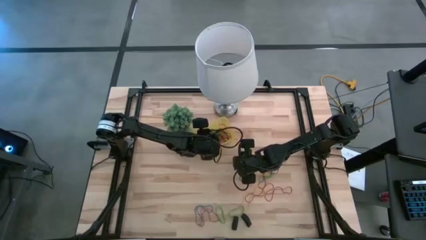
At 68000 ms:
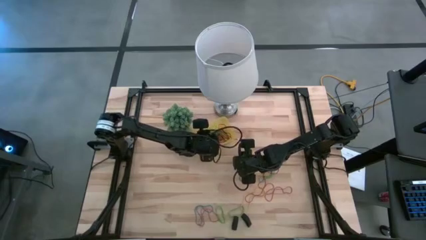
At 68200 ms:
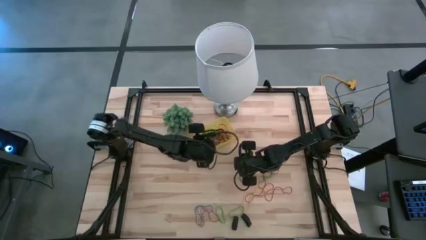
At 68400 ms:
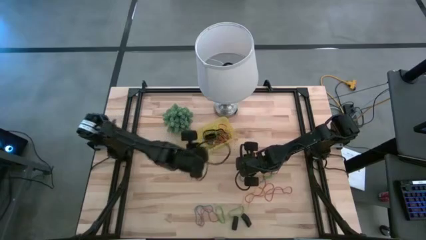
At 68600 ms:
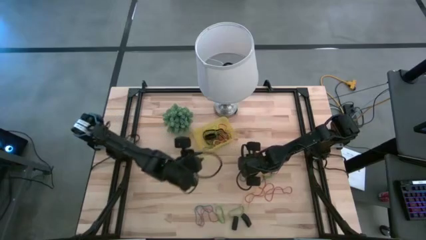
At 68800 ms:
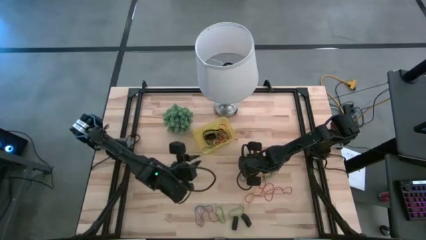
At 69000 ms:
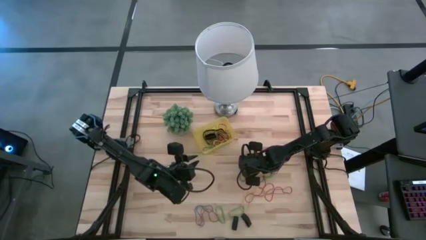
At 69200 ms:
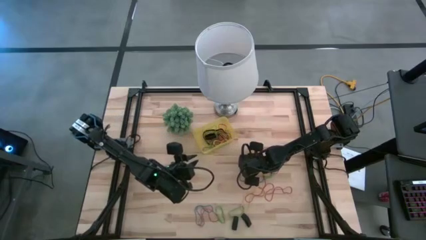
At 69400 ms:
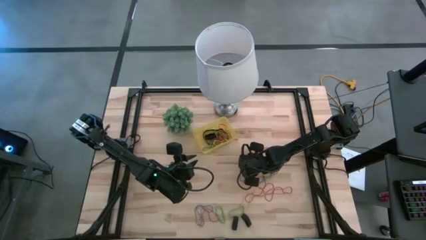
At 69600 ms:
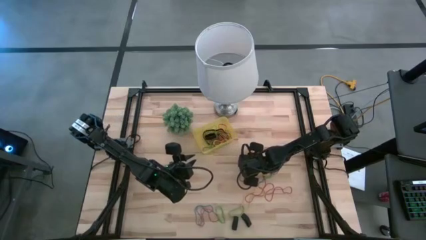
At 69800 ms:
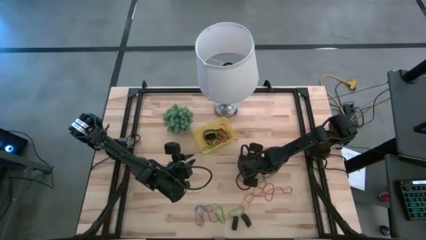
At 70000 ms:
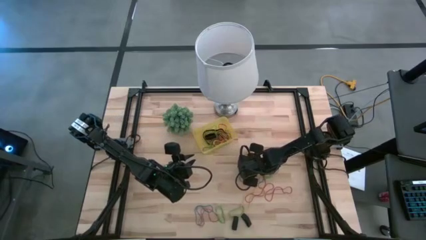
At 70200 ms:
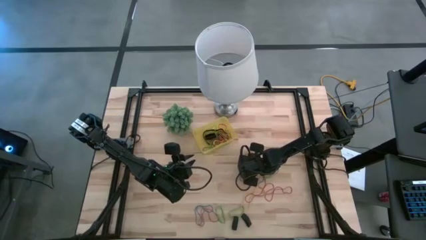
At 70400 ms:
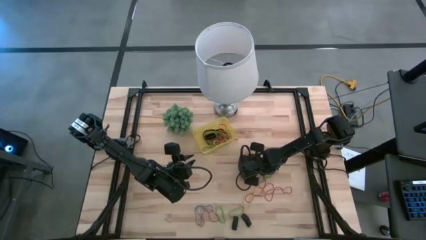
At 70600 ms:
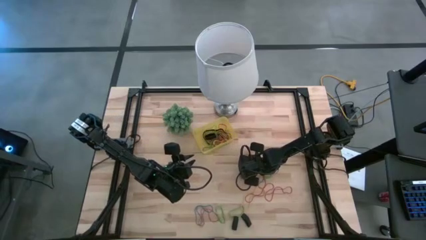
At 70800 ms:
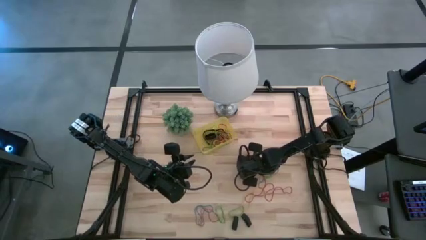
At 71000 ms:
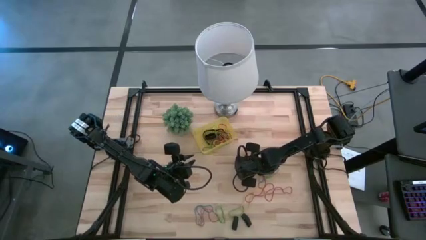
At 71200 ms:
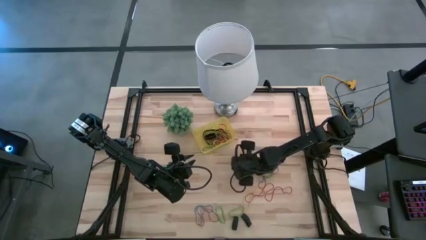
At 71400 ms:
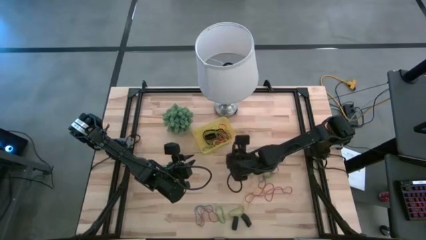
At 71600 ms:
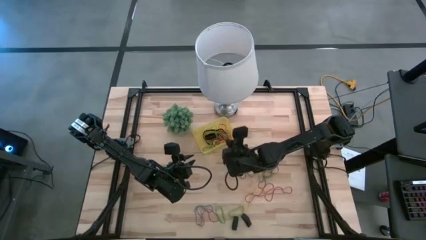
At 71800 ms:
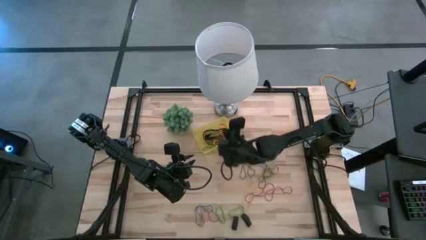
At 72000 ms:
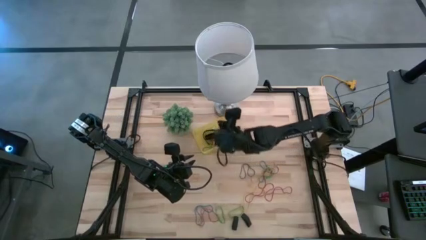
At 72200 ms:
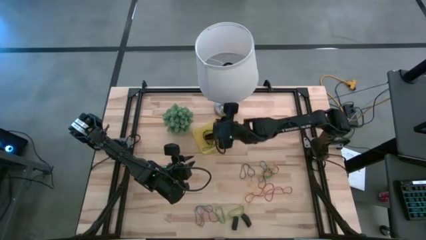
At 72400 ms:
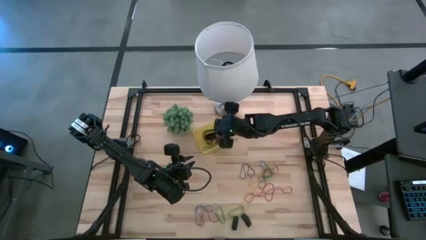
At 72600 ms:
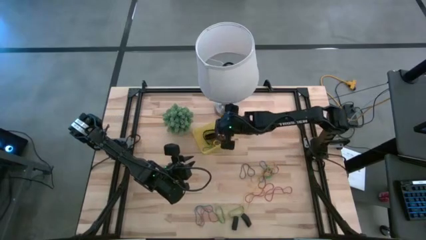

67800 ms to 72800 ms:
Task: Pick and place rubber bands into bin
Put the top left yellow rubber band into the yellow bin

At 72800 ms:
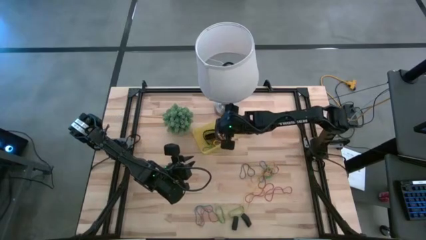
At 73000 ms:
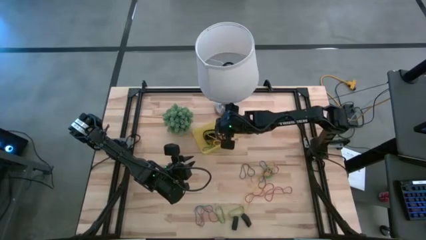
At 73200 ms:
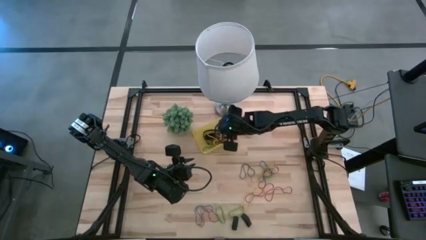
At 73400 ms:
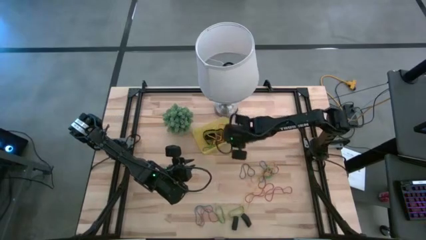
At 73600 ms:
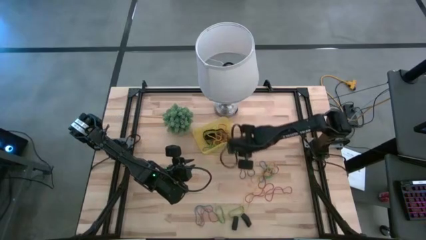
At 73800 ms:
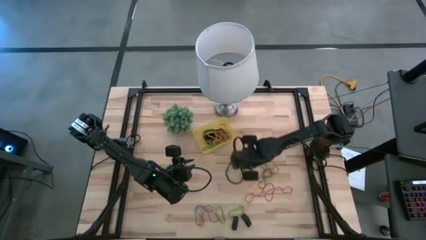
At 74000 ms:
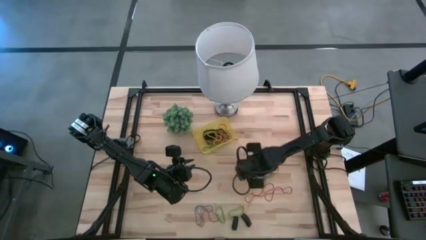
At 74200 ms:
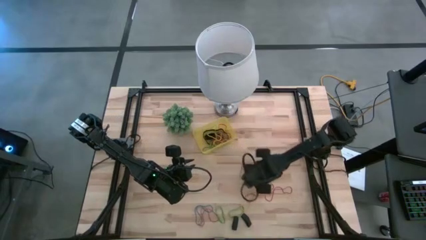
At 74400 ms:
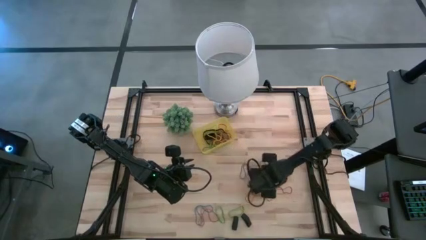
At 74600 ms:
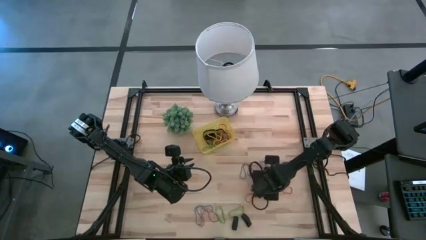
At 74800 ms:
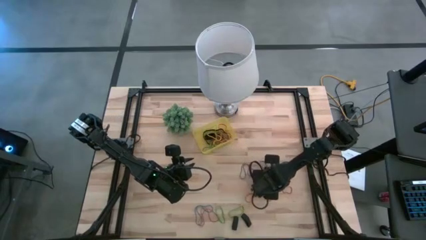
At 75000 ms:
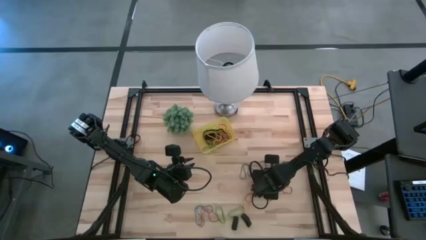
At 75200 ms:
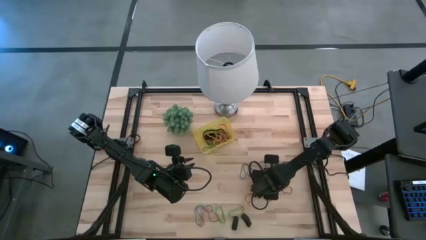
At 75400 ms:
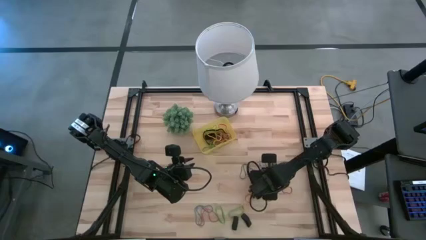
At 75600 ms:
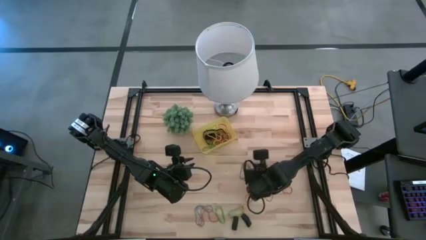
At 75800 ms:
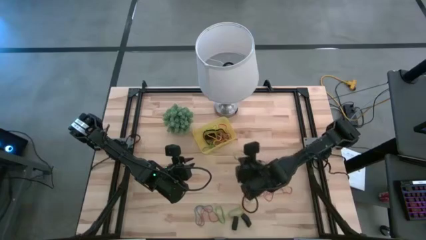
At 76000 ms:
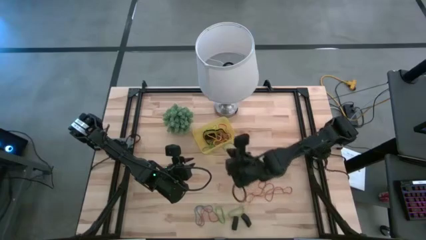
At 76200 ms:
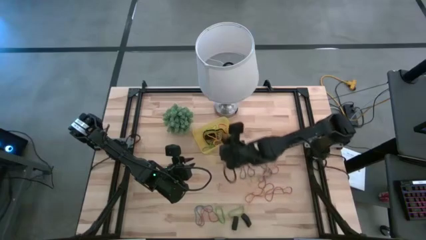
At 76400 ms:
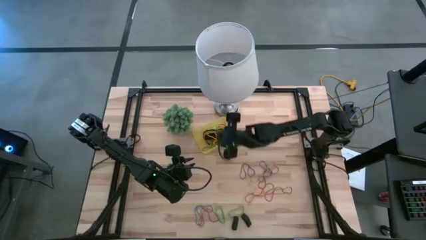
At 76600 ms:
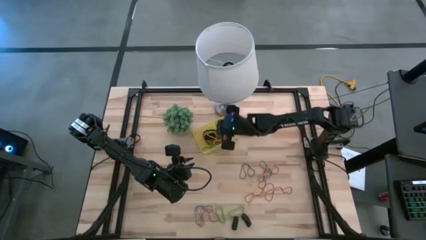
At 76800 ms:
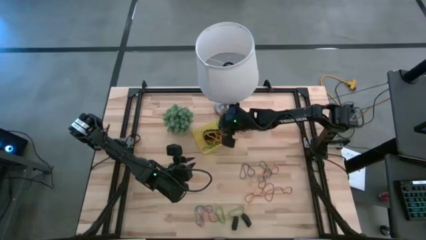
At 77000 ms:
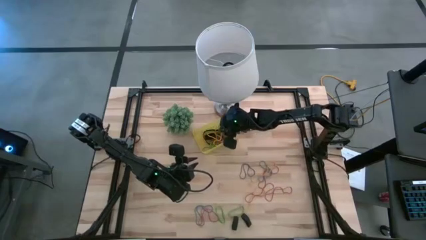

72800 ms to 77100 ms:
Put the top right green rubber band into the yellow bin

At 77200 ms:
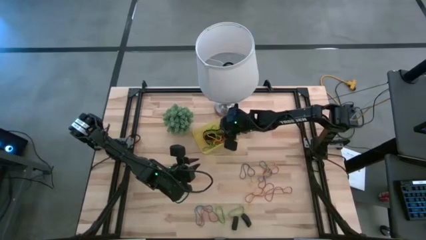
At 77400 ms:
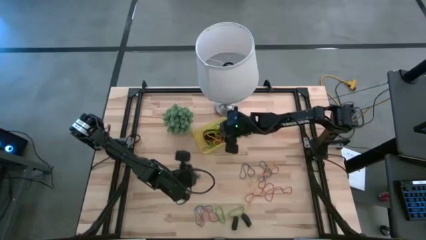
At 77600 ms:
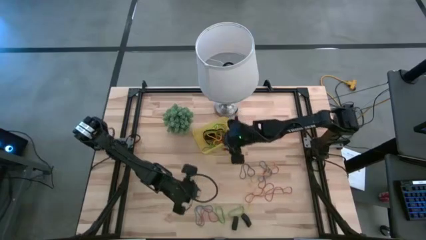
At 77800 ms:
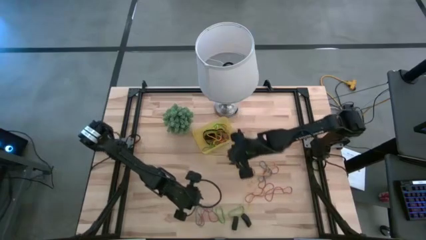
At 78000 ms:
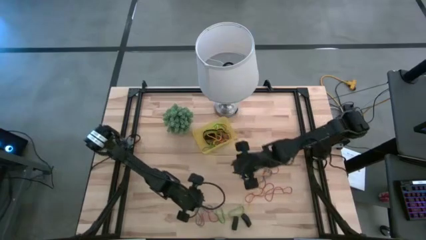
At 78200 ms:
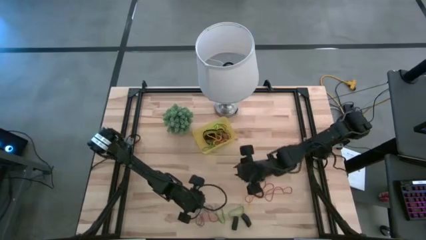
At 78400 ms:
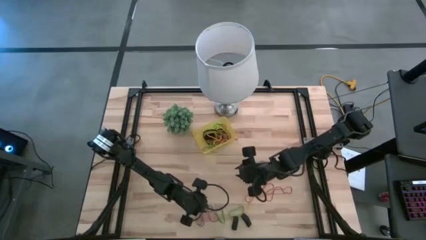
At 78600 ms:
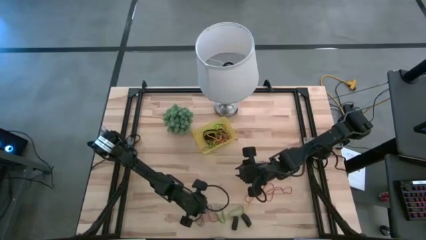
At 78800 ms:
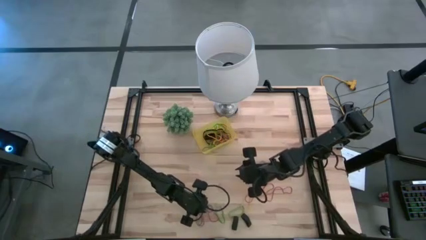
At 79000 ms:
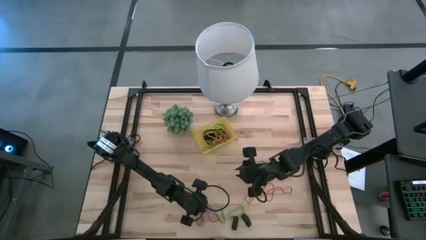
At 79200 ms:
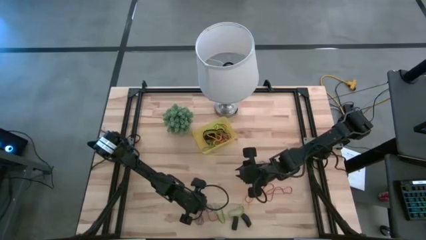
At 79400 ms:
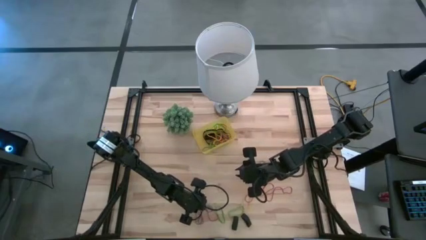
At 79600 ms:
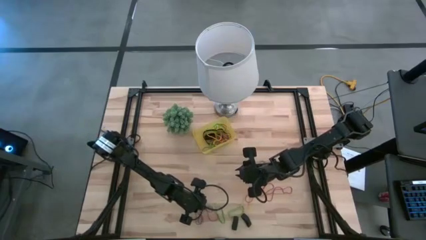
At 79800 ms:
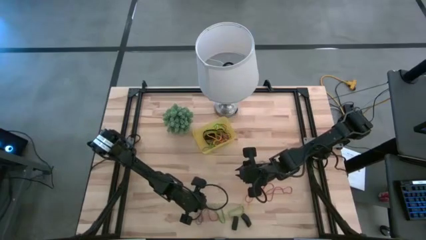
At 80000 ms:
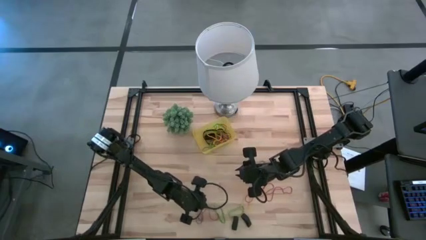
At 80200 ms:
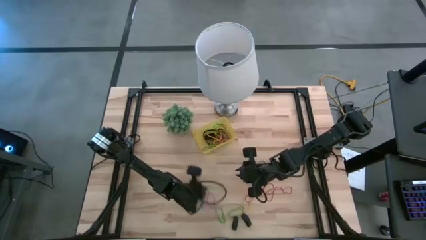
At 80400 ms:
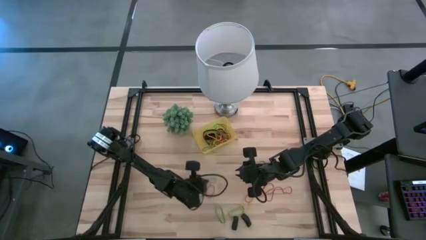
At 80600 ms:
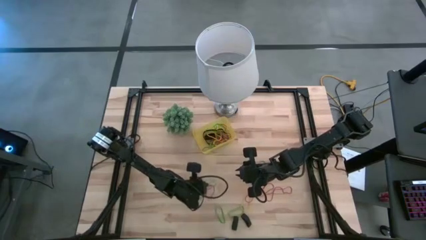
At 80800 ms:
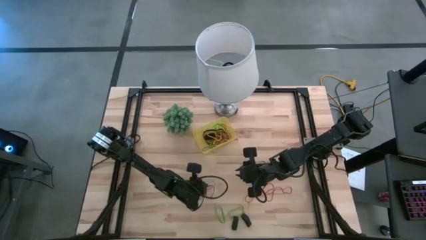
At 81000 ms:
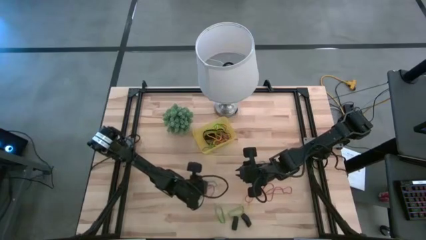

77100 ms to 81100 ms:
Put the red rubber band into the yellow bin

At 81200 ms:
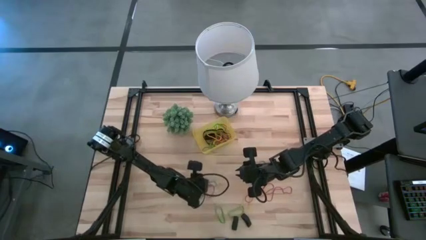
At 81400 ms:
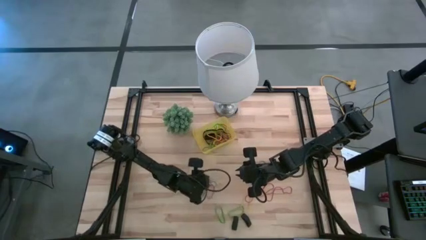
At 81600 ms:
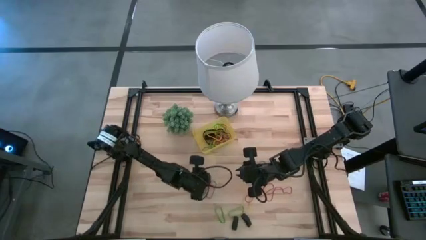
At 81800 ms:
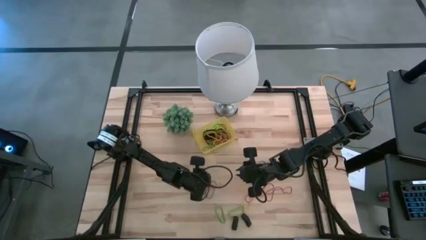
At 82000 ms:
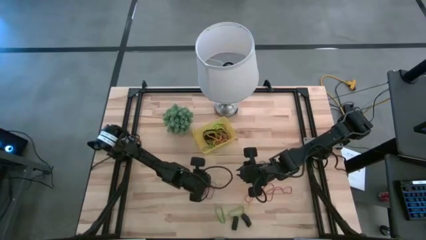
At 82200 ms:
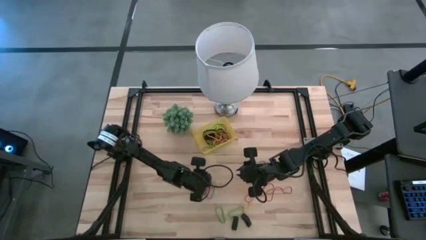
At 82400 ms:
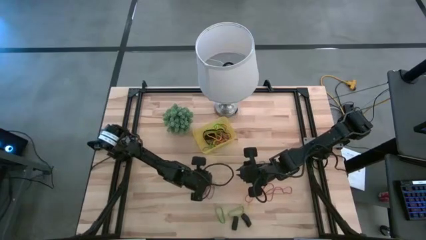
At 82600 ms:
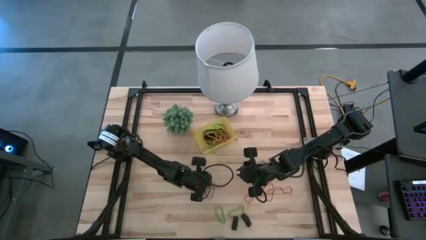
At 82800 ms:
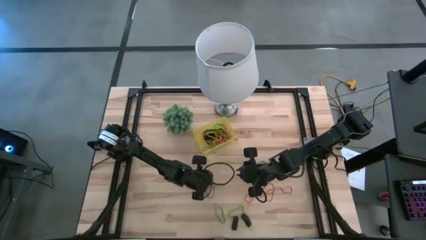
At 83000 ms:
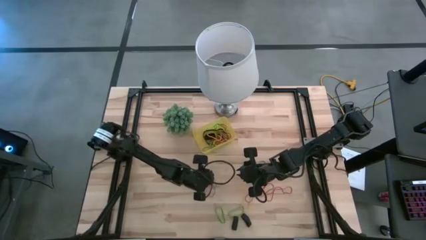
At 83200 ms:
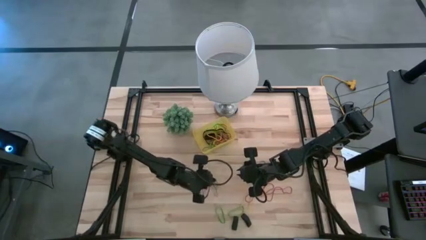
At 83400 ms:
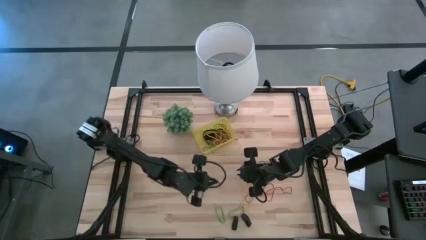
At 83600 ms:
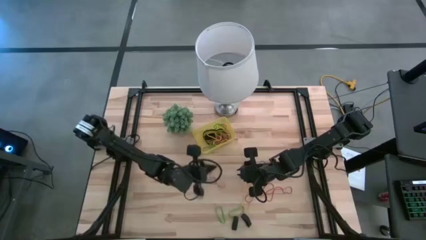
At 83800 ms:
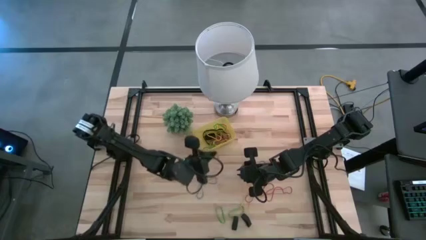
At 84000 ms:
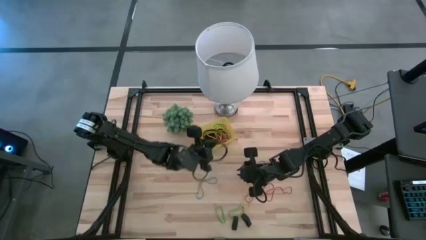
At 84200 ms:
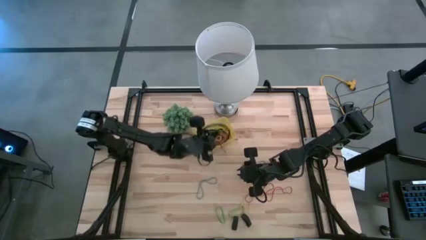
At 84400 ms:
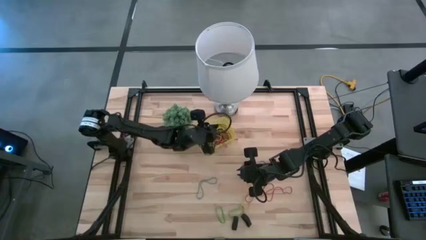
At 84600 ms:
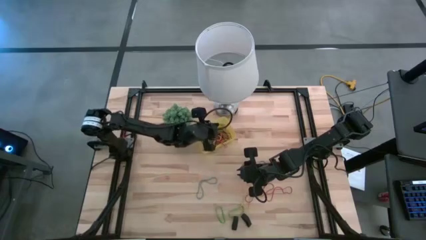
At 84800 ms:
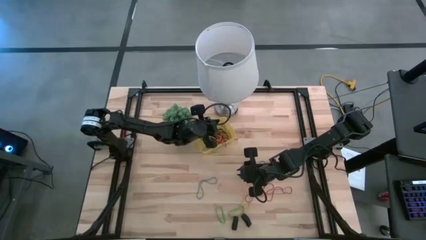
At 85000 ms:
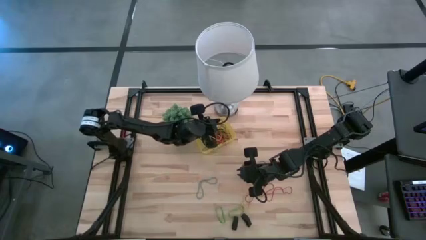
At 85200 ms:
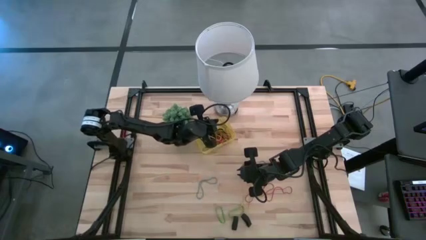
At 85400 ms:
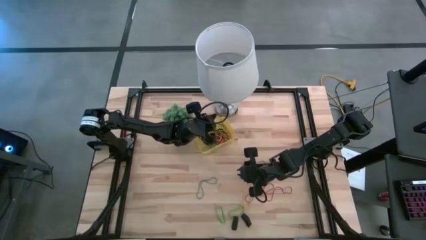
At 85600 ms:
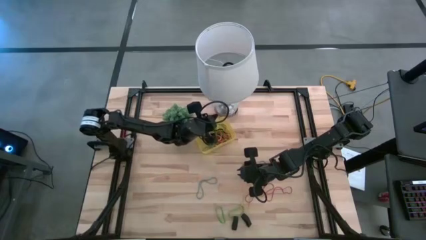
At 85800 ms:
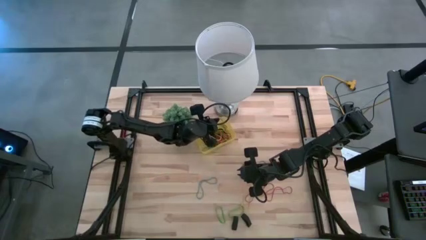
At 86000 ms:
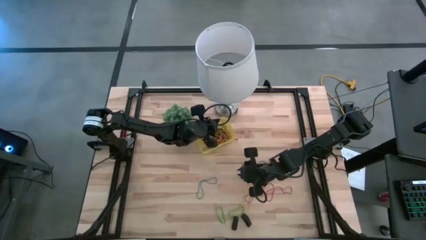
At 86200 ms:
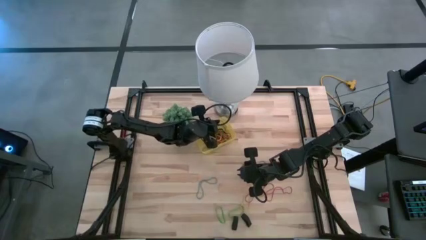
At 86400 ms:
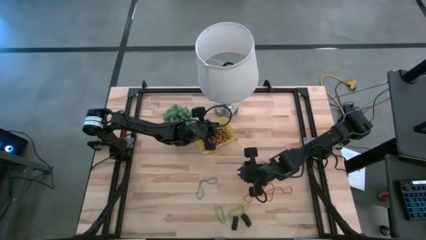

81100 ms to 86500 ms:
Put the red rubber band into the yellow bin
